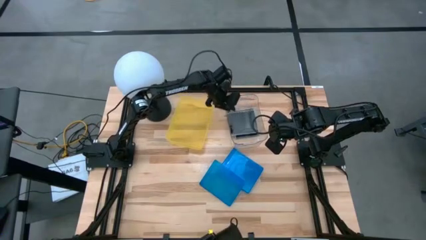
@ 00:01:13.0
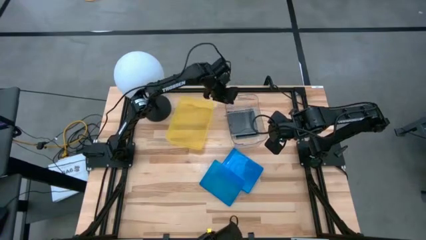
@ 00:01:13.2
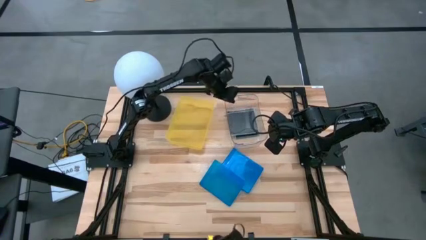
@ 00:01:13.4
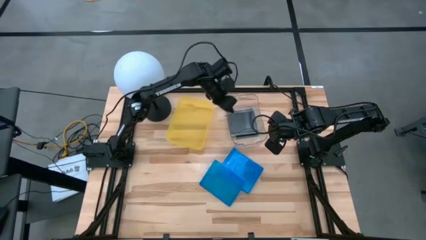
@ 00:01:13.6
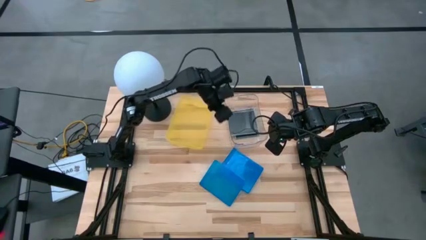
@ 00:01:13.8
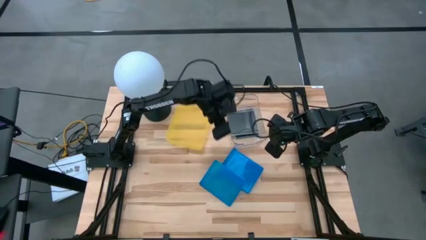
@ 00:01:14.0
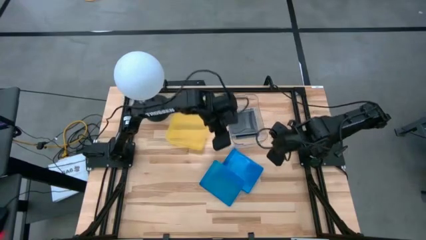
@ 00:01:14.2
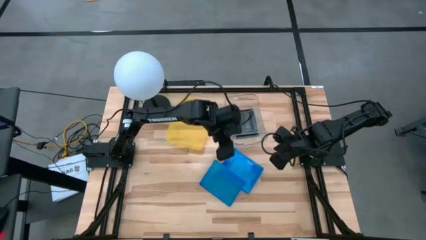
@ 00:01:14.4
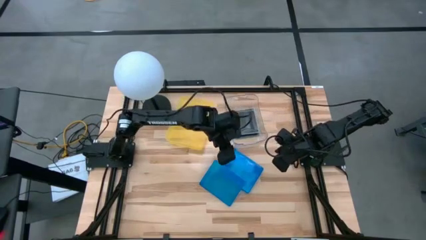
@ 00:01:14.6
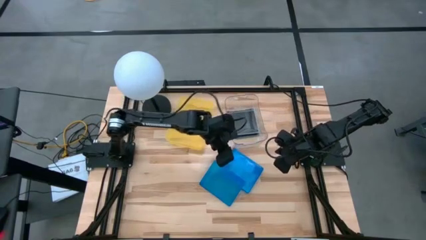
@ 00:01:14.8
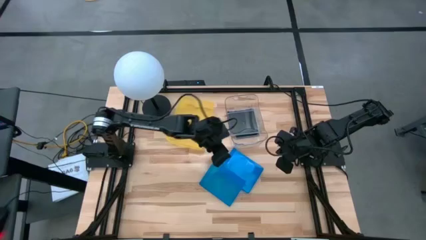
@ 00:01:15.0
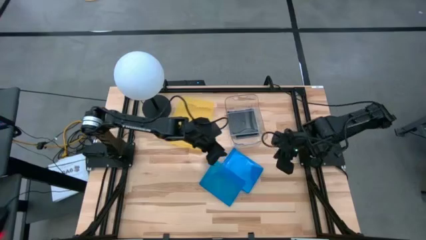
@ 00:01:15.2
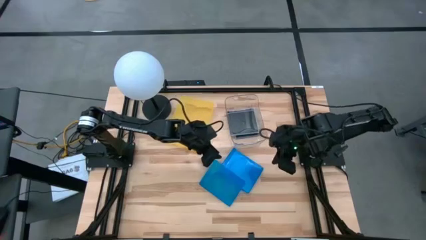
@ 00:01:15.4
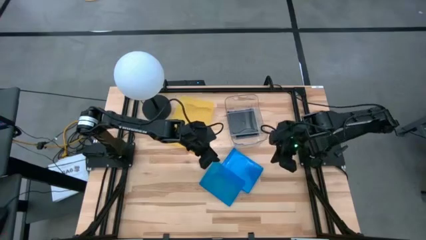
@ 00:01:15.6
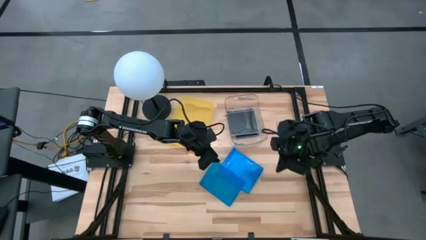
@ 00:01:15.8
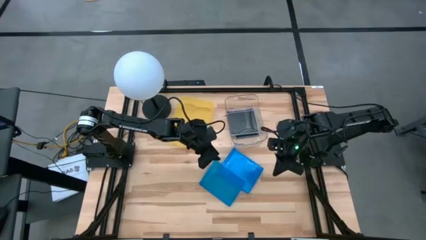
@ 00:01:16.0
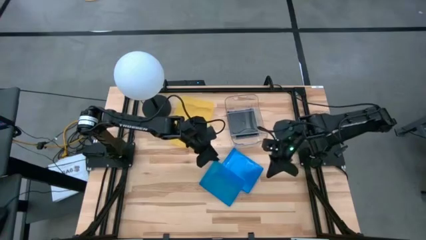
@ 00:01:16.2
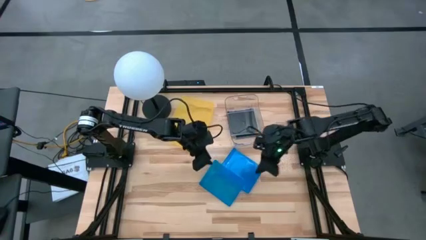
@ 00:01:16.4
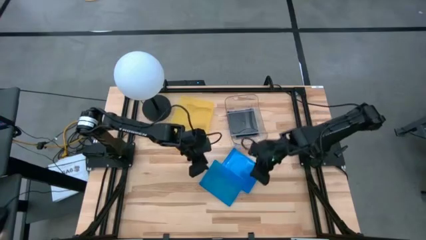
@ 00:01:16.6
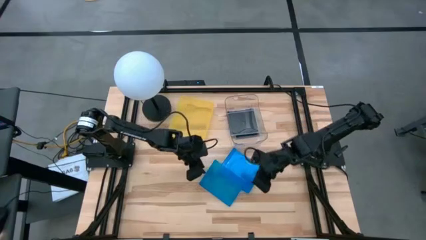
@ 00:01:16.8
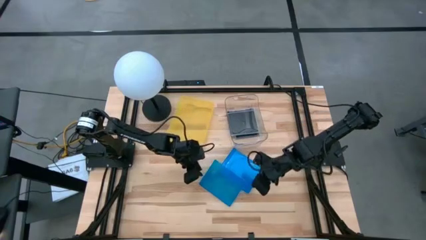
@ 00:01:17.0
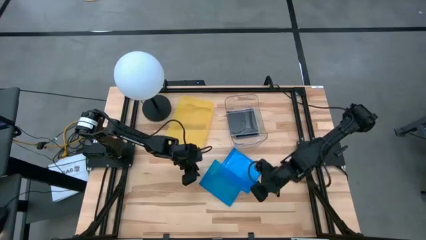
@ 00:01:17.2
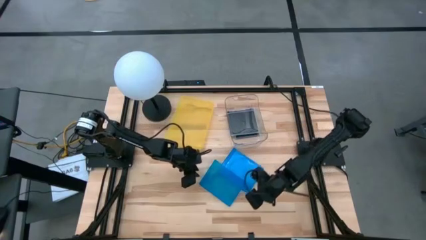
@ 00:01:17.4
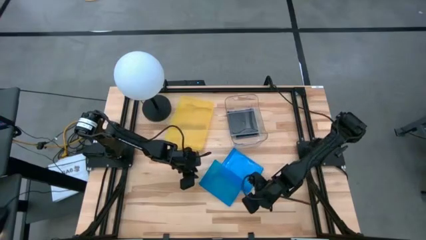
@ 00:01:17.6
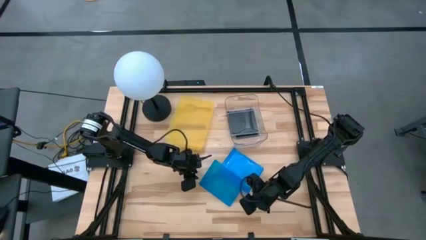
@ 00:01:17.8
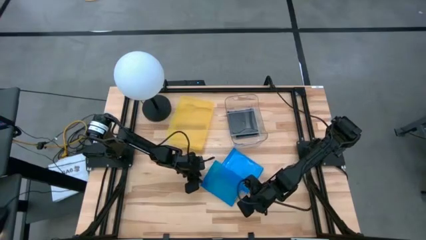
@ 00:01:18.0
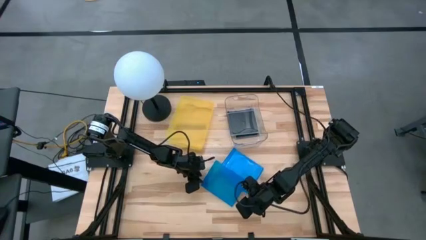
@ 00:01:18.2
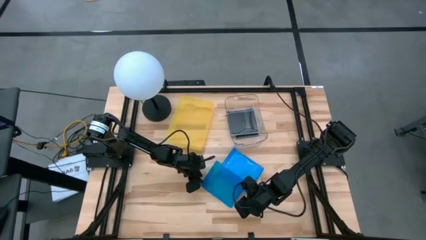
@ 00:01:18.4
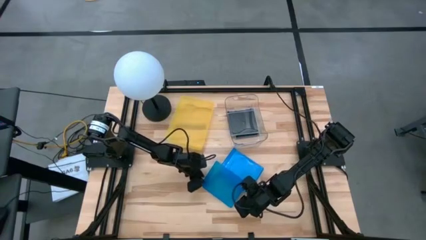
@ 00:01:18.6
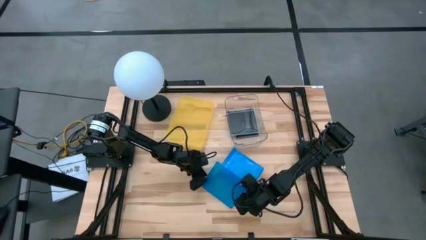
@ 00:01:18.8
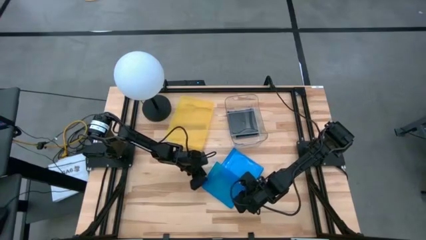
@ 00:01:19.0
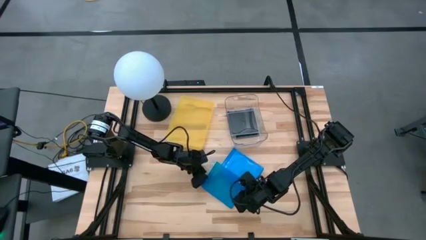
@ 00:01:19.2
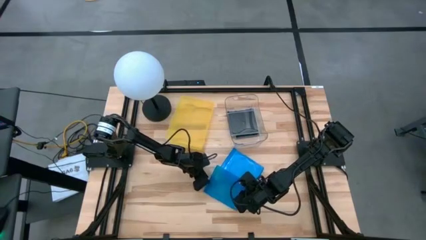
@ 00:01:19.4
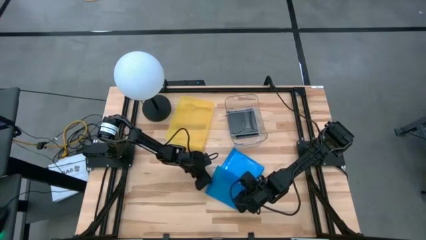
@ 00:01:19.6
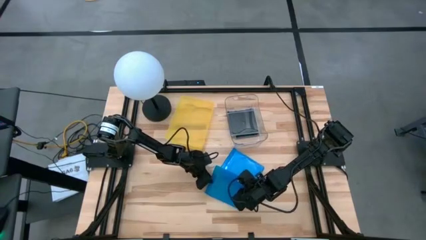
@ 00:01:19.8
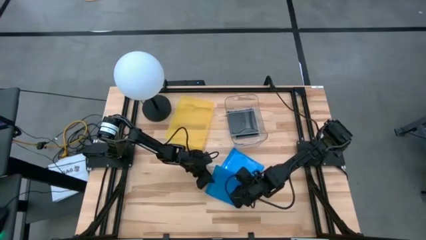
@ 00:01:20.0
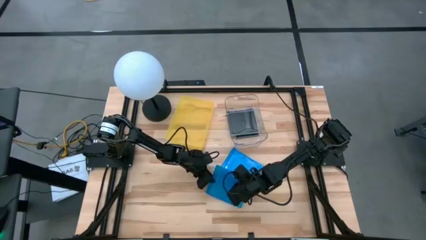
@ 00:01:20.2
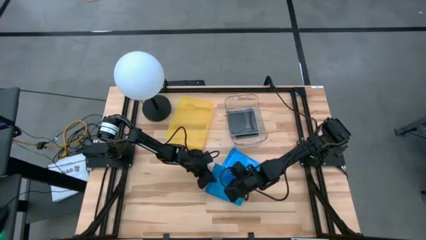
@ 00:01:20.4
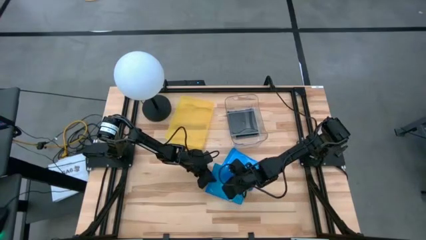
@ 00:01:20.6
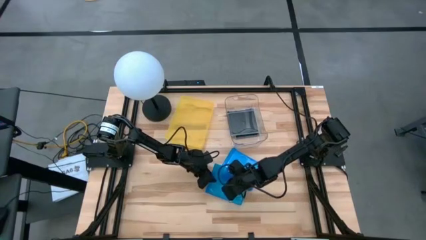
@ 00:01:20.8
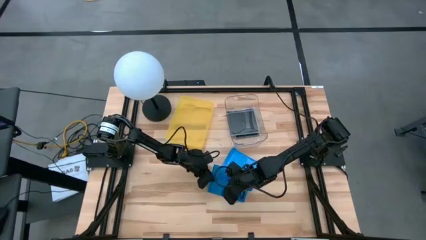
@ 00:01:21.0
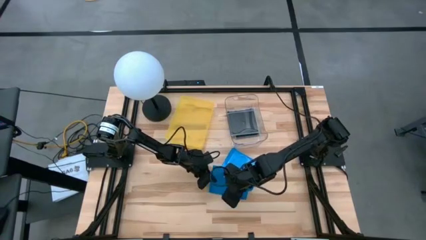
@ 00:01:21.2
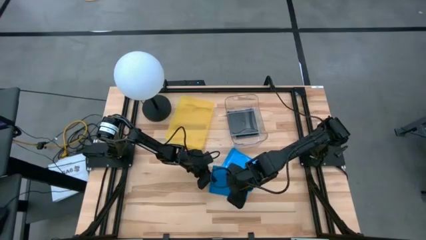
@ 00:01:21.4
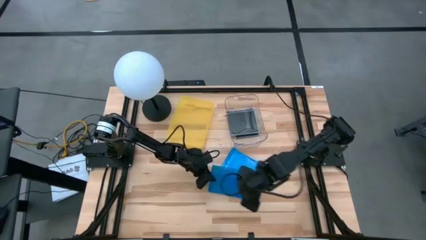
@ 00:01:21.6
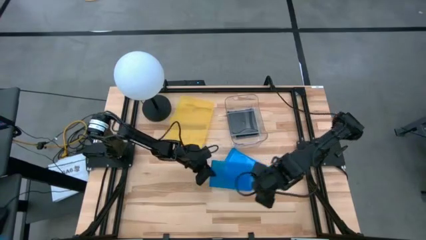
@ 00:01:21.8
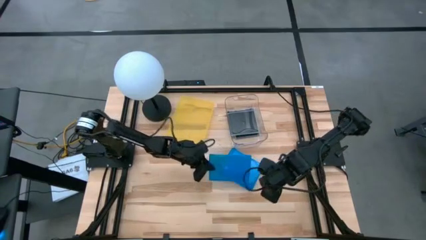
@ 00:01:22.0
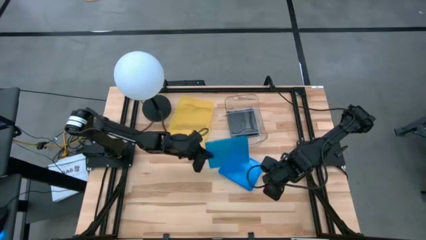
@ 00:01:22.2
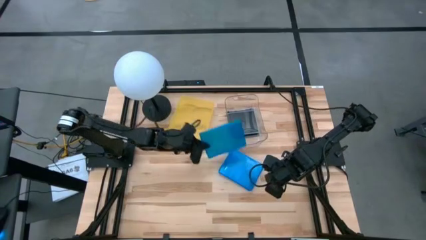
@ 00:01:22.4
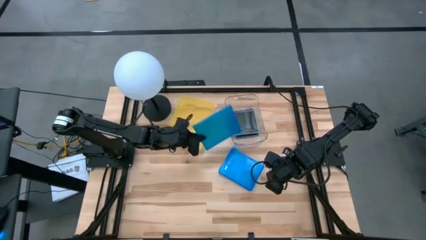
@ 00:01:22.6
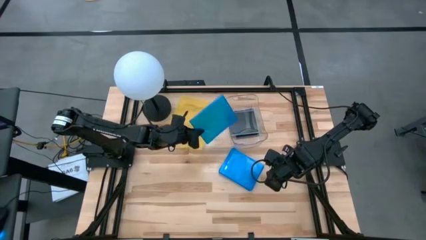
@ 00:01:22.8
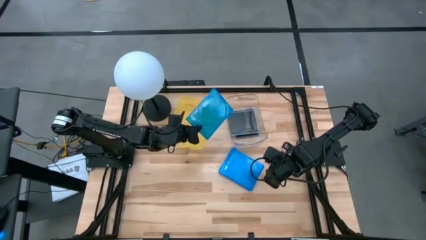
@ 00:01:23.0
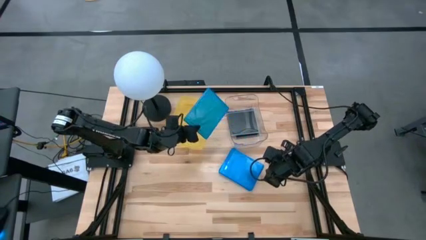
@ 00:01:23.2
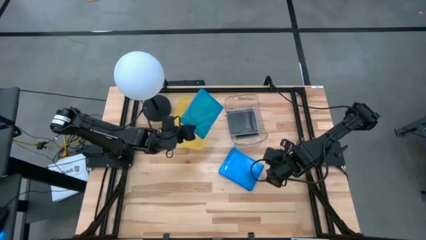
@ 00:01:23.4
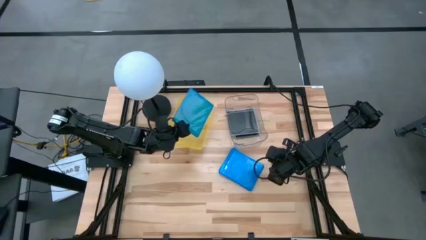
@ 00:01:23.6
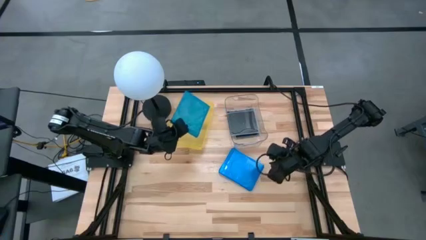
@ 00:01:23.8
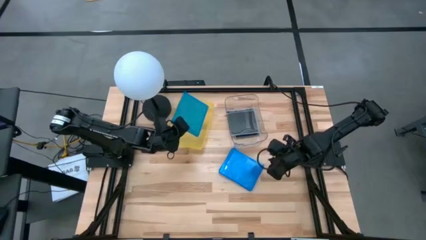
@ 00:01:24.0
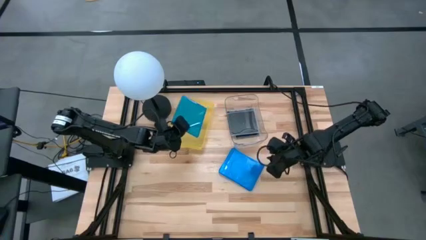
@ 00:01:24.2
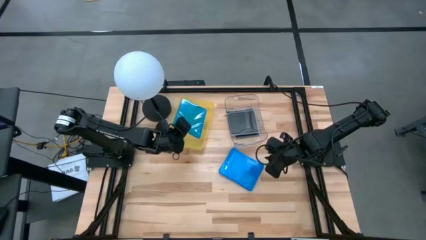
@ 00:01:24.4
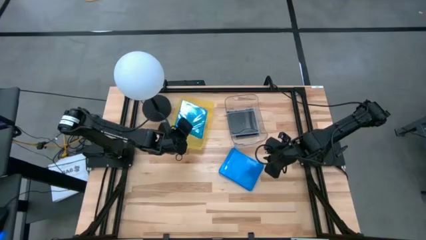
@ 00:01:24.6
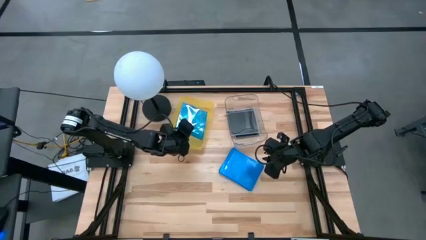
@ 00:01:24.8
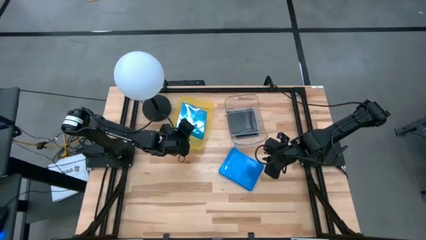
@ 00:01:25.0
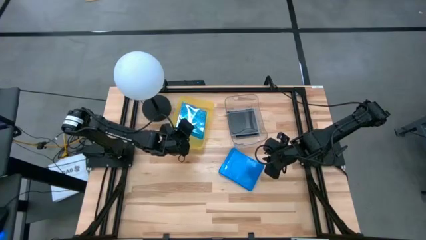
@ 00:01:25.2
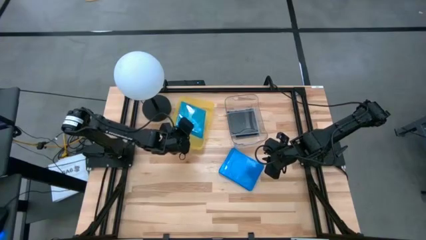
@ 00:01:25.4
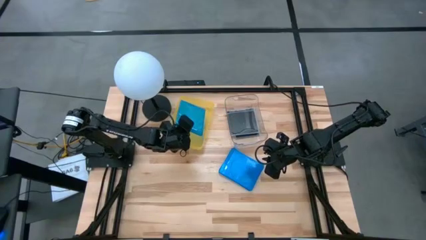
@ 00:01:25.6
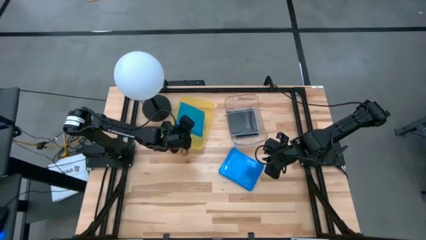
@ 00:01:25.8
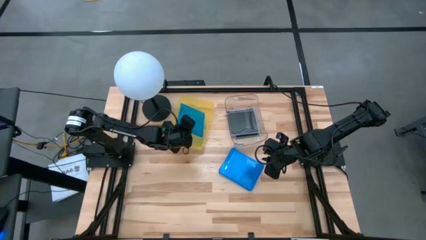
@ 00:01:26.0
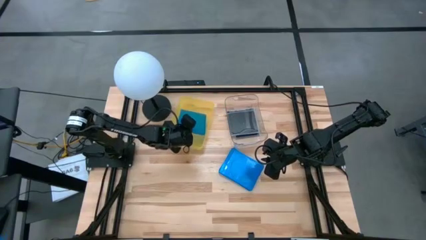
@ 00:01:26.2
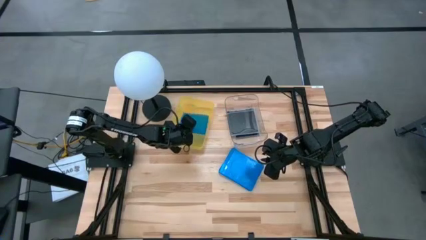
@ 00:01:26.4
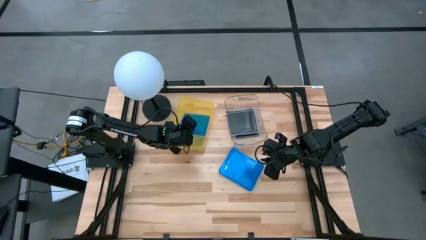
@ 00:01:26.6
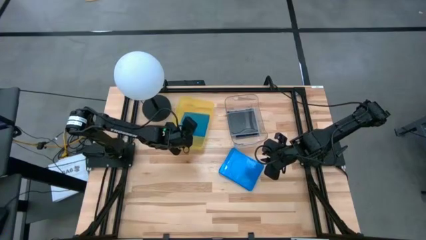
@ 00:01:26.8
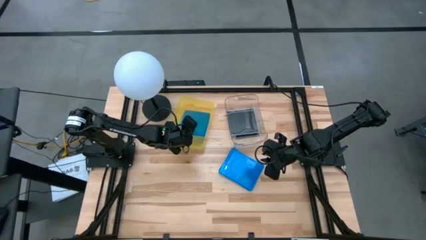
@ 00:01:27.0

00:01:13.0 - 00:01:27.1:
Task: Pick & place jewel cases by type
Put the blue CD case into the yellow bin

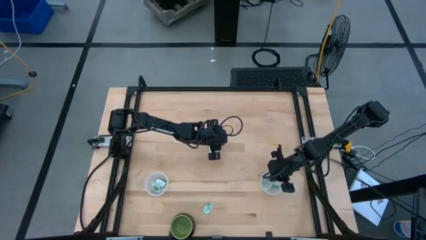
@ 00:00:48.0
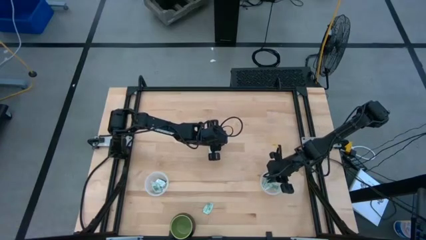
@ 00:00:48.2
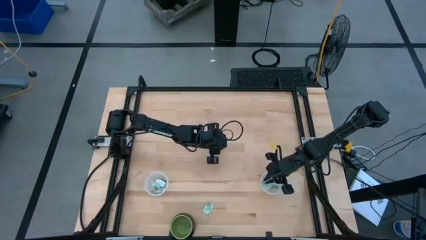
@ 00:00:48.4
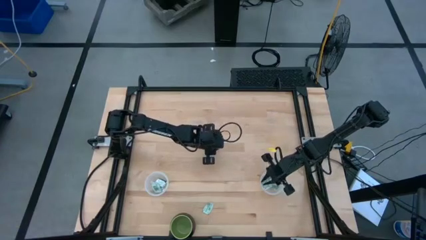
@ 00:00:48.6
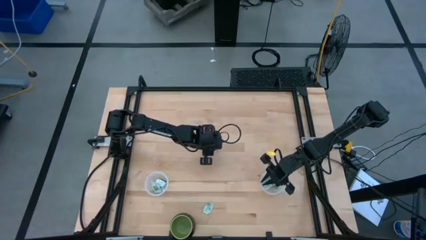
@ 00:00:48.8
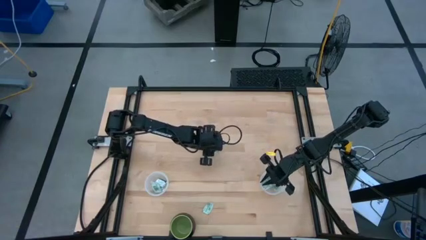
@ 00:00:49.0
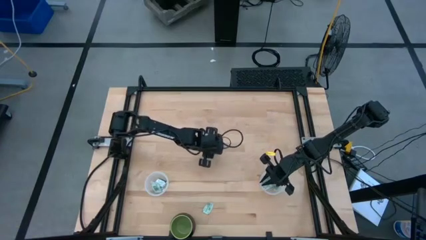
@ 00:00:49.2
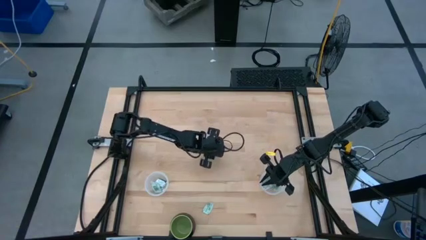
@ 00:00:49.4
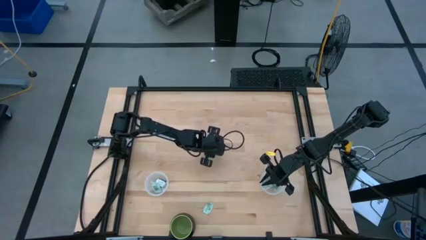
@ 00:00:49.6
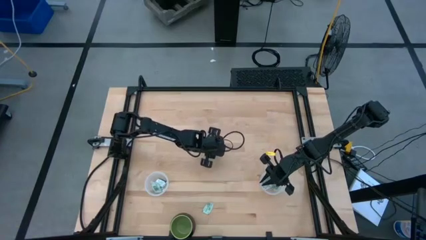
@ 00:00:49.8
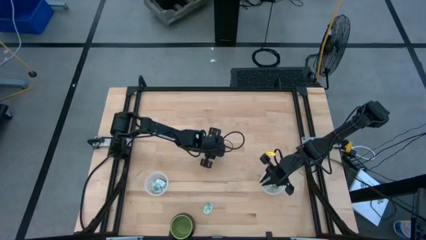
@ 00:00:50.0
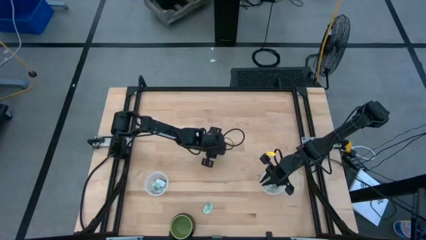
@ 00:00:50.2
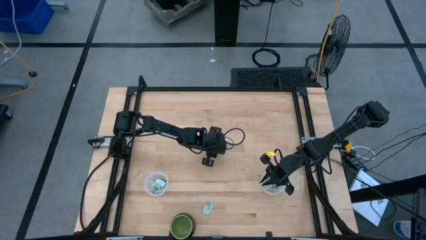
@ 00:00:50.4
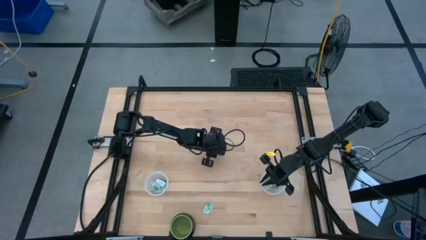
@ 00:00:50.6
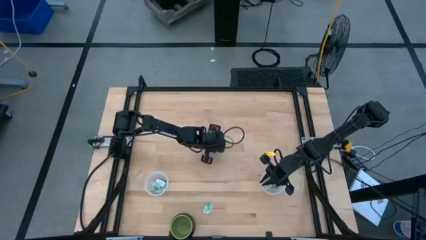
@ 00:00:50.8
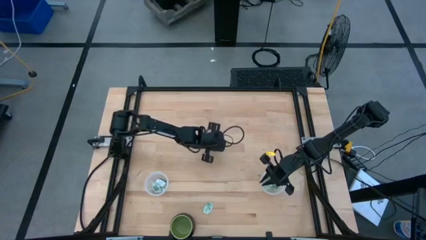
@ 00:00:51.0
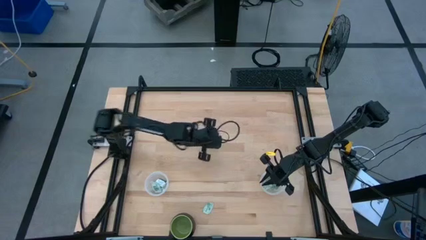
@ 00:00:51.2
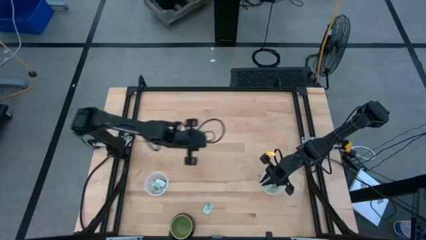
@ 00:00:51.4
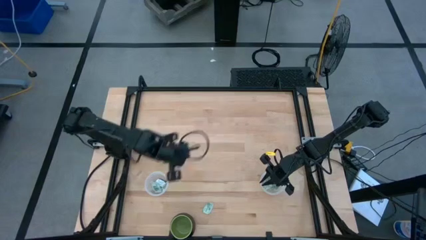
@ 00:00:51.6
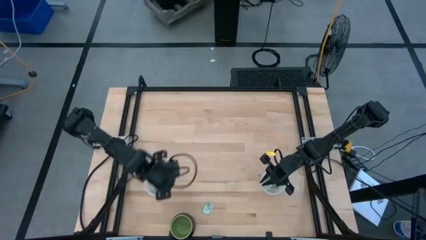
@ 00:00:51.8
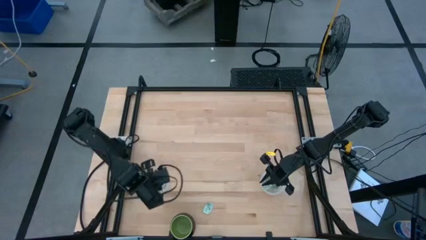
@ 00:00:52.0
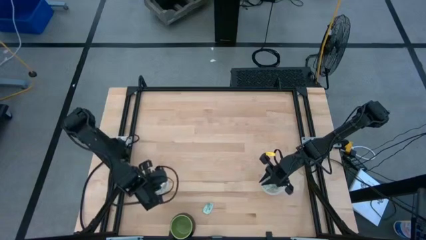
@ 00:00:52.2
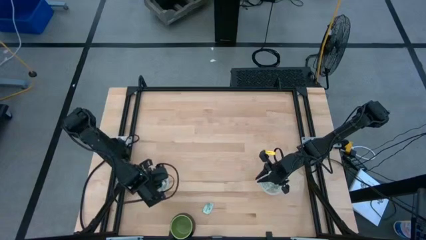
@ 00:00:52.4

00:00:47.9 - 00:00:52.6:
Task: Pick and place Stevia / Truvia into bins
Put the white stevia packet into the left transparent container
